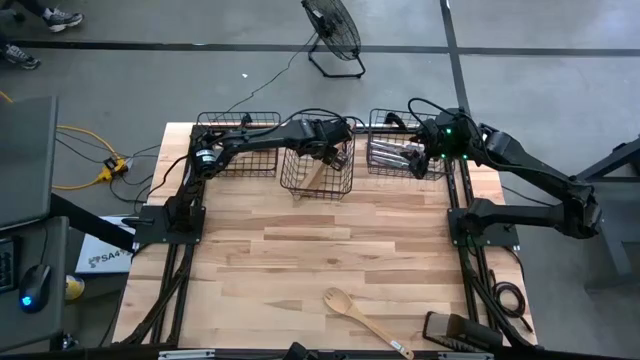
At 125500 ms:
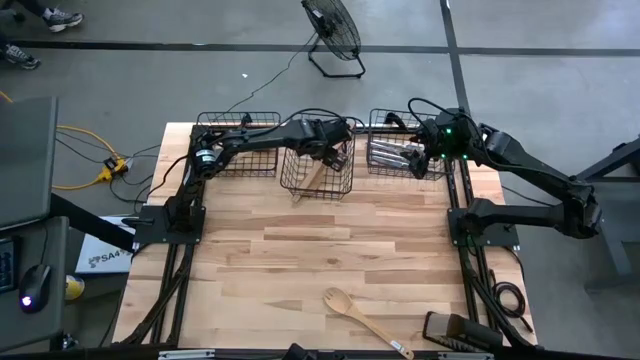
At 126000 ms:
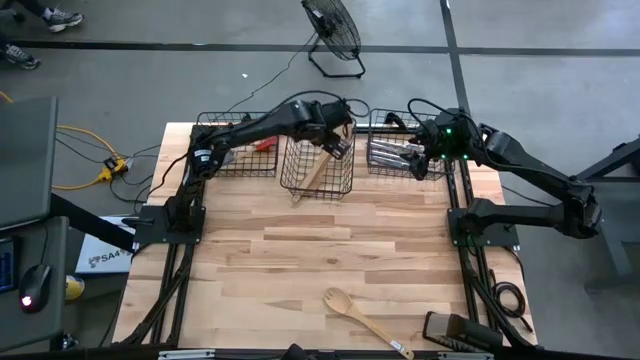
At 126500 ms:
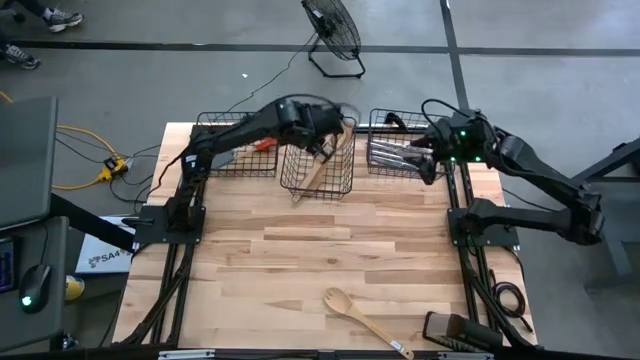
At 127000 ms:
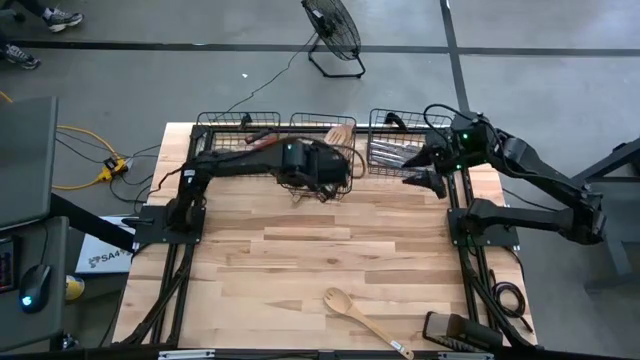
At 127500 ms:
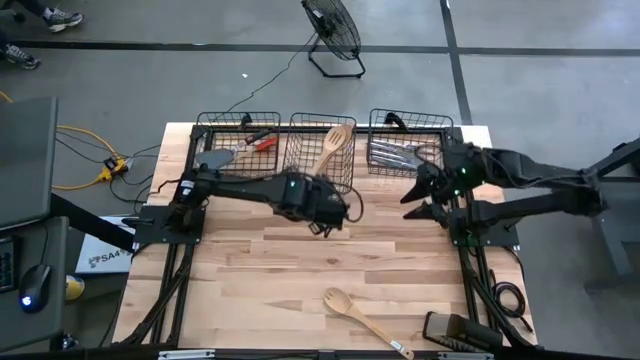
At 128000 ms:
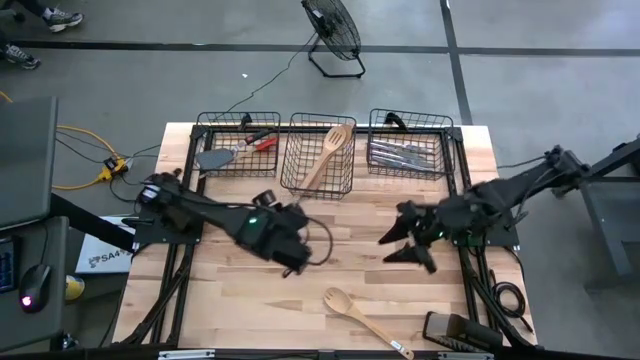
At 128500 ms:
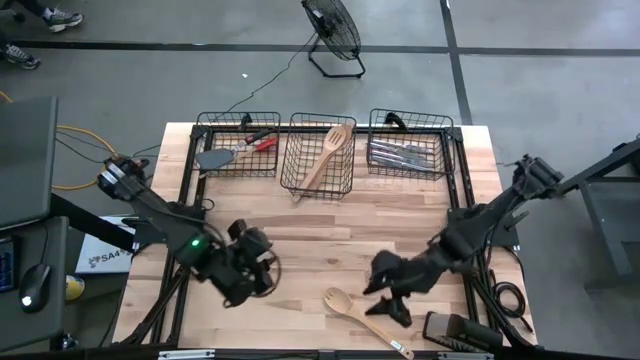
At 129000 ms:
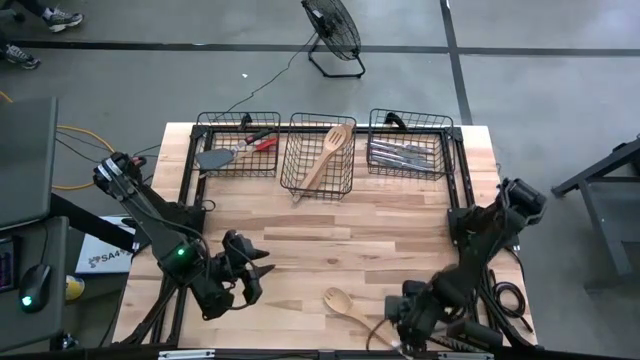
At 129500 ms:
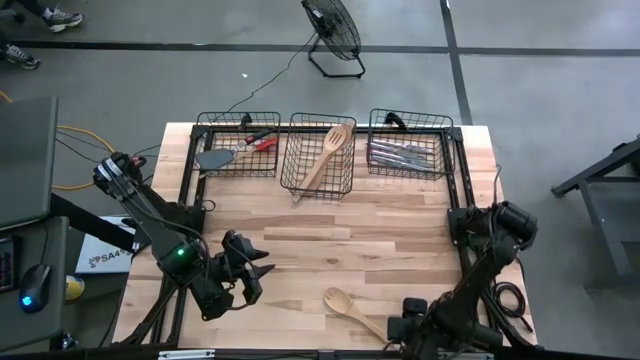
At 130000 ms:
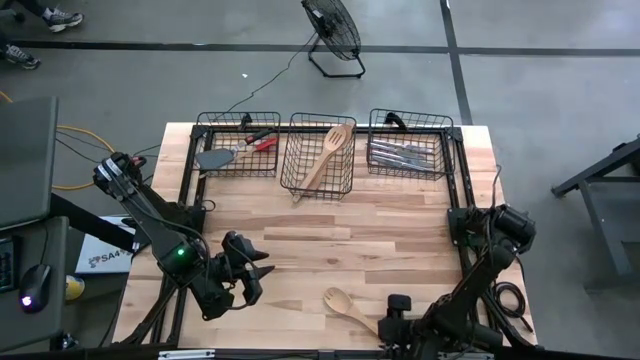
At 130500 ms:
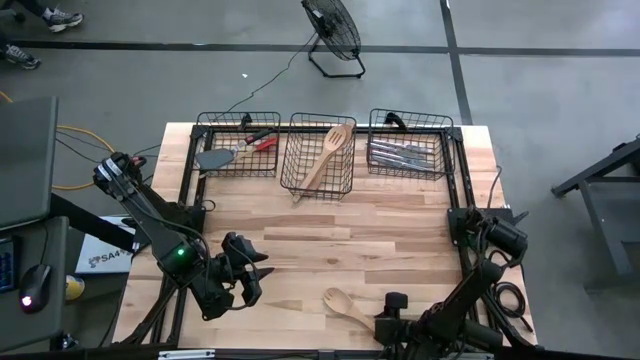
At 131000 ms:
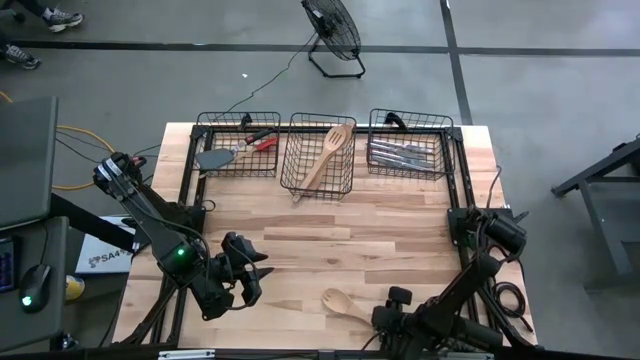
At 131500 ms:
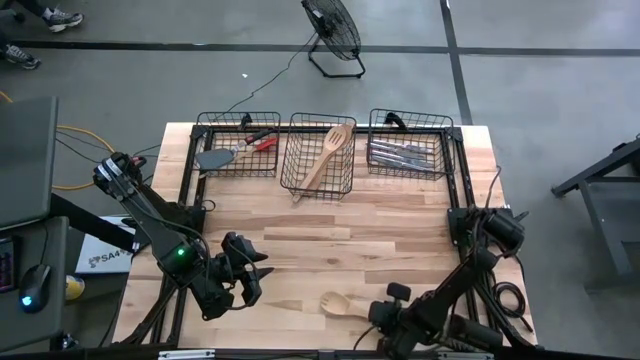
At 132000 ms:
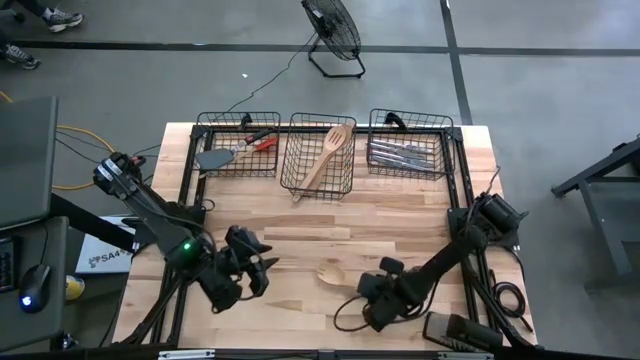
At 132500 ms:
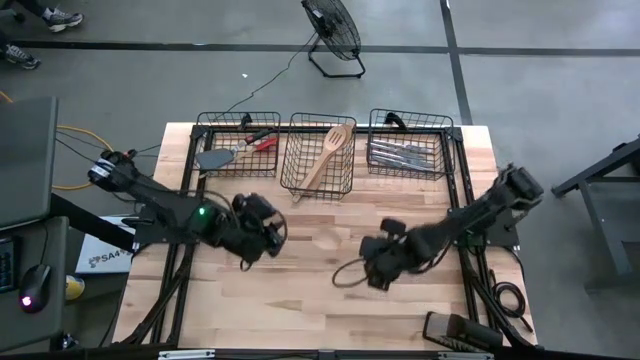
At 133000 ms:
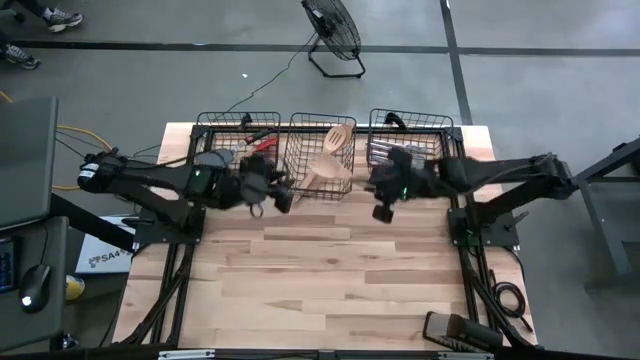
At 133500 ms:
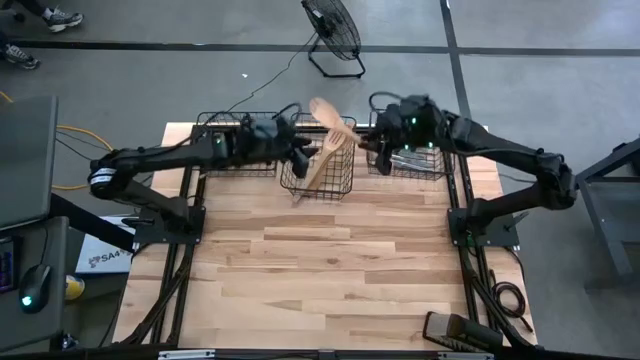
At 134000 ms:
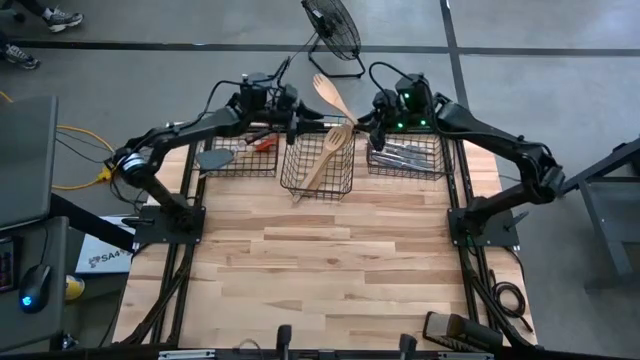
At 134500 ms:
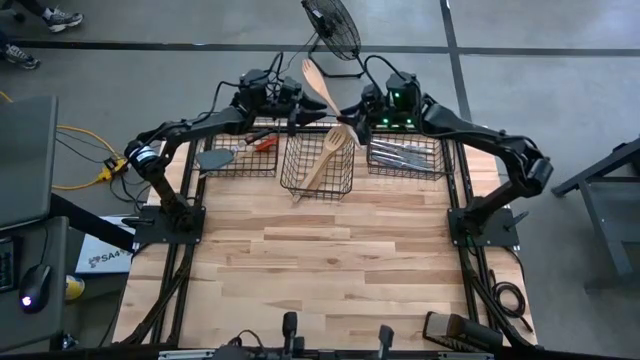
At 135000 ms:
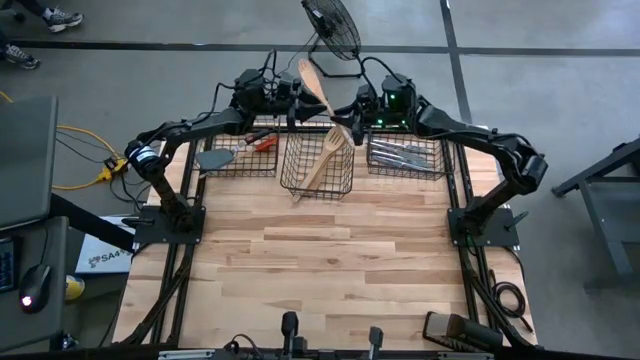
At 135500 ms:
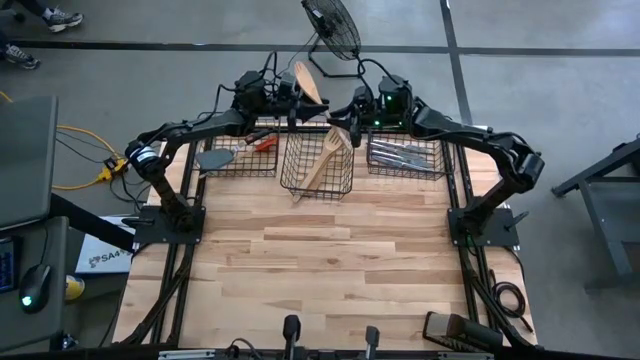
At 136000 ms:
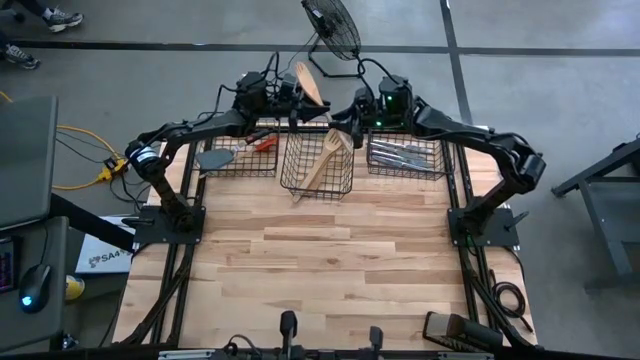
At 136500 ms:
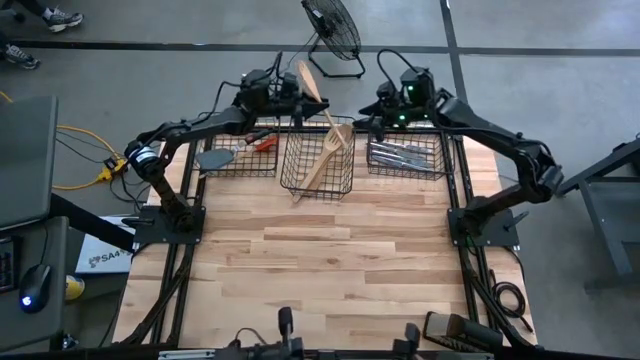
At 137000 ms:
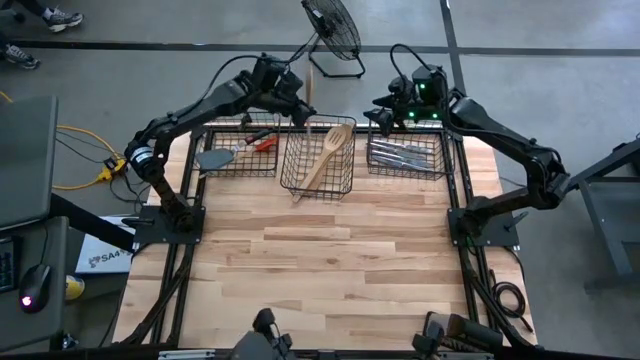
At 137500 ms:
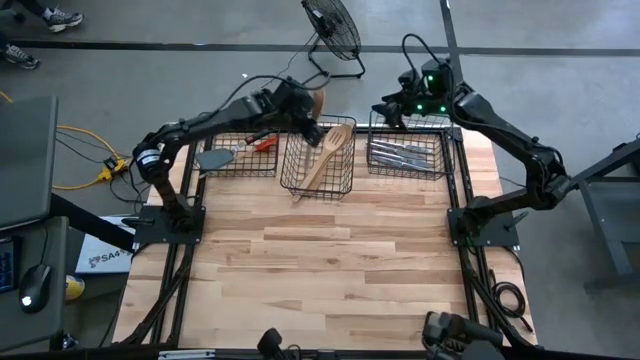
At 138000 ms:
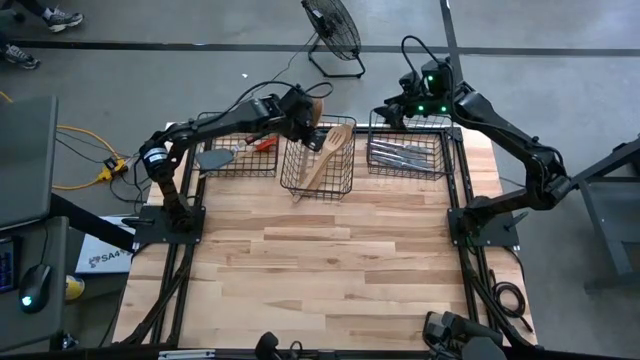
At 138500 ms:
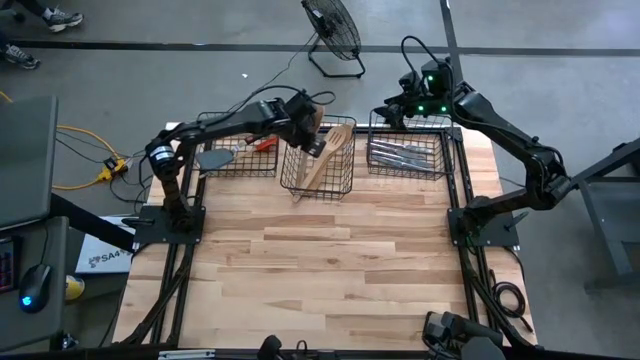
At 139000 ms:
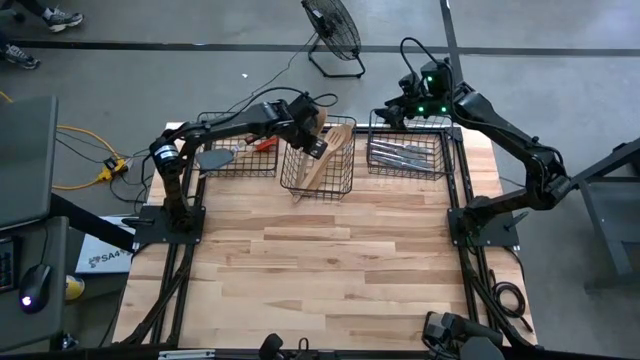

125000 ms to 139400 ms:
Task: Pick & Place Kitchen Items
Put the brown serving spoon into the middle wire basket

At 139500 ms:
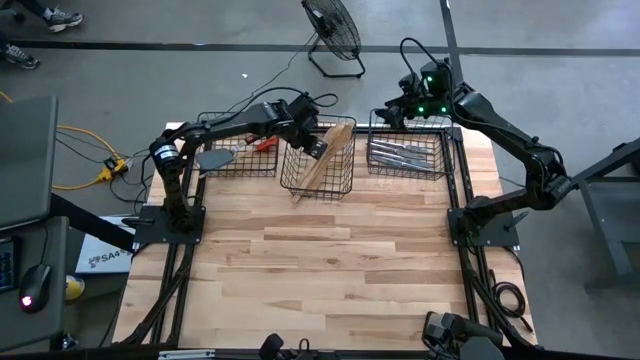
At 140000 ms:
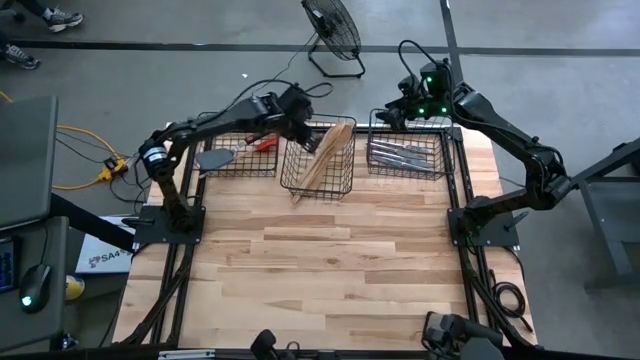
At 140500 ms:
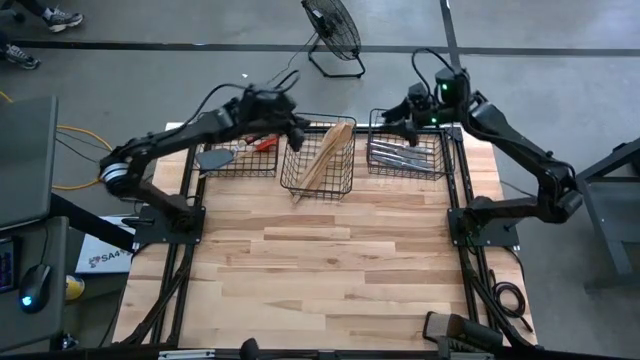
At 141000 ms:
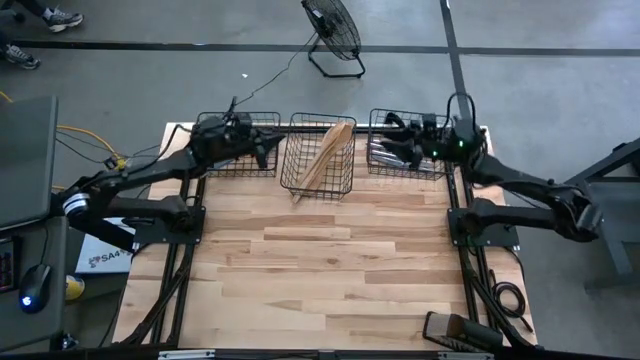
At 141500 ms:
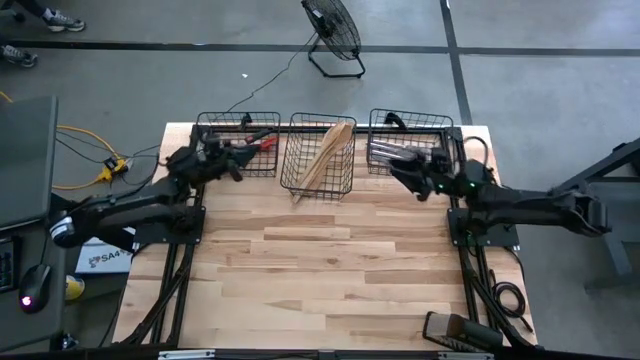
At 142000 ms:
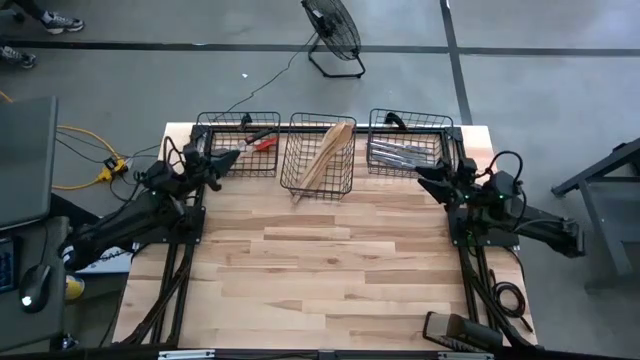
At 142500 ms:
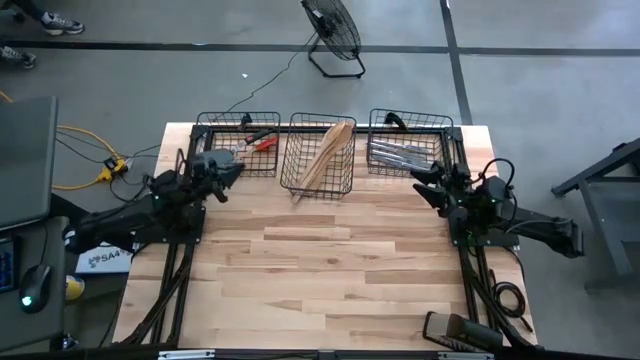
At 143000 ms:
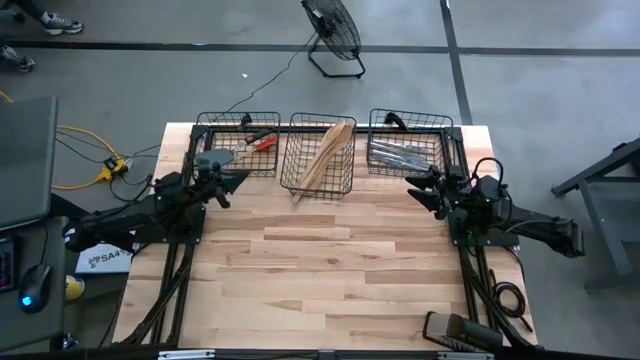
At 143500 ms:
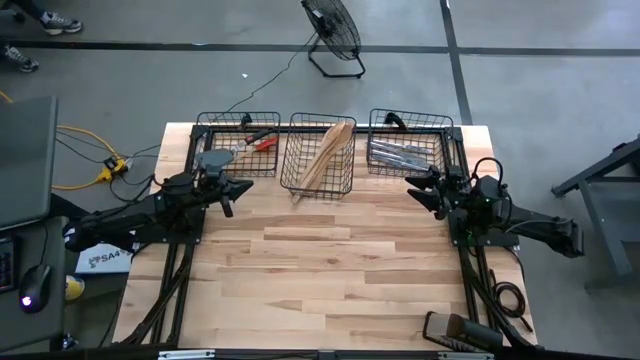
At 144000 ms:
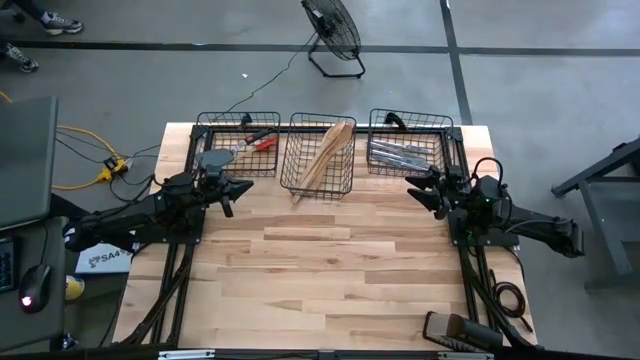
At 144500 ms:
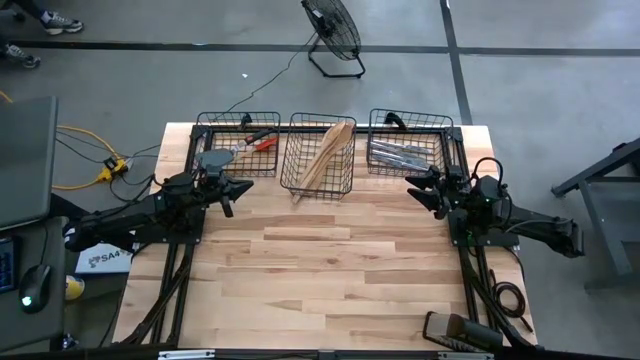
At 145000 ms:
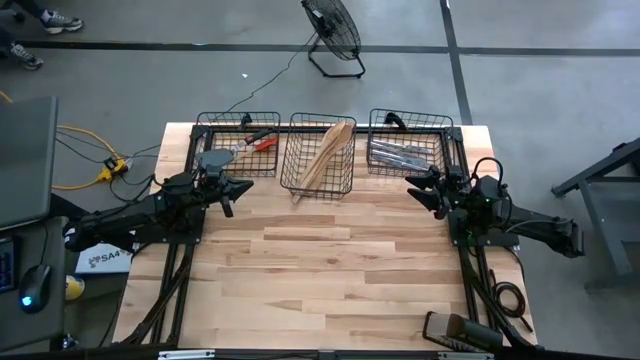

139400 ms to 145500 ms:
Return to Home Position

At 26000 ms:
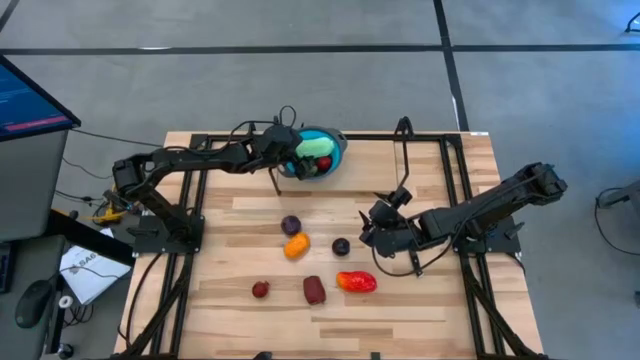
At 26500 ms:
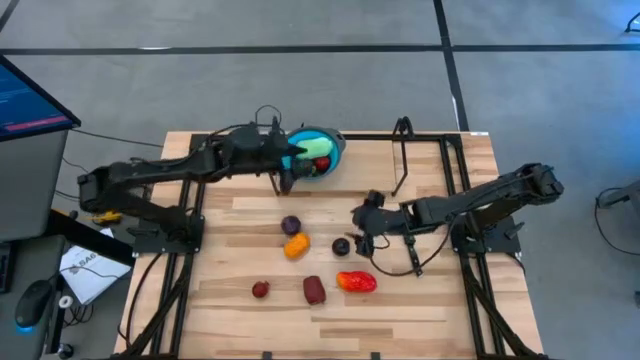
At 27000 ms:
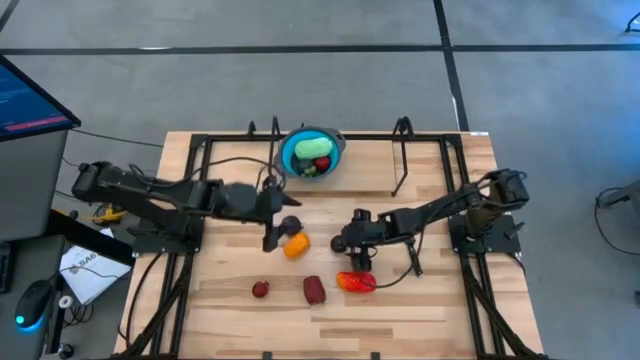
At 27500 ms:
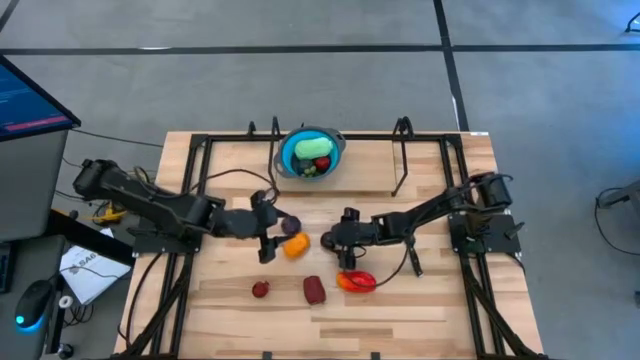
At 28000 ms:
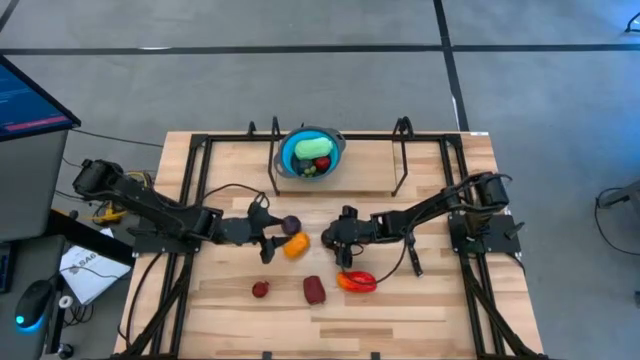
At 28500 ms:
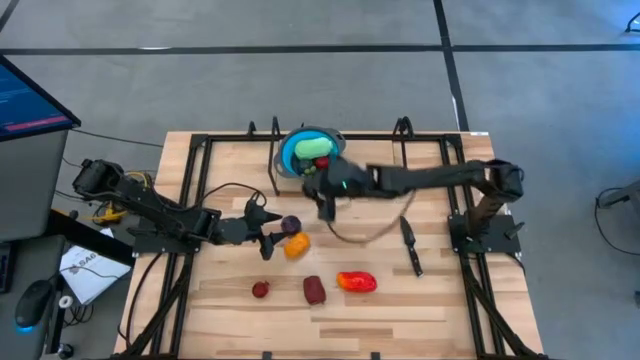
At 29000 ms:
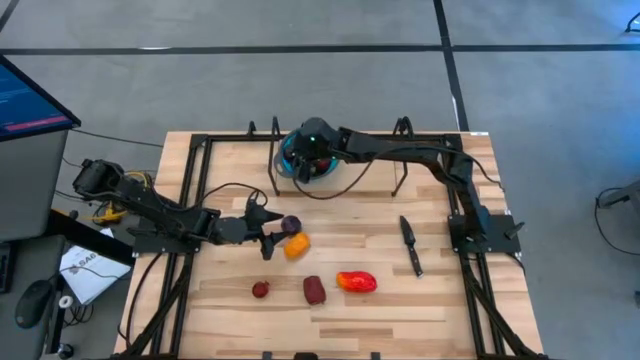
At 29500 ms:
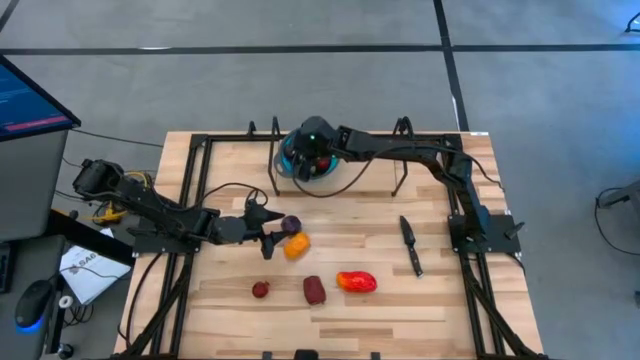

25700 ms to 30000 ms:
Task: Pick & Place Fruit
Put the bottom purple plum into the blue strainer bowl on the shelf
